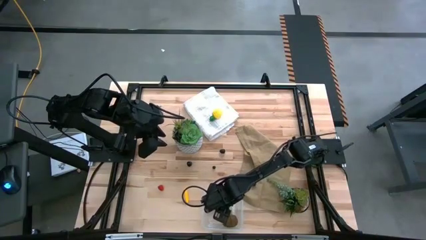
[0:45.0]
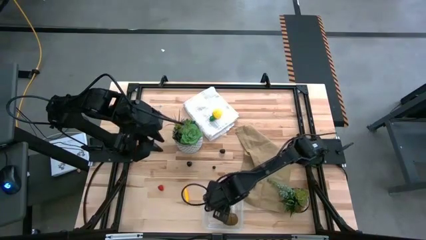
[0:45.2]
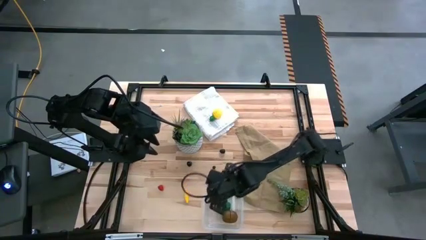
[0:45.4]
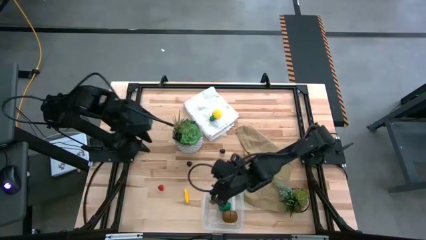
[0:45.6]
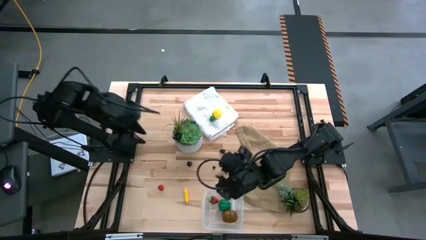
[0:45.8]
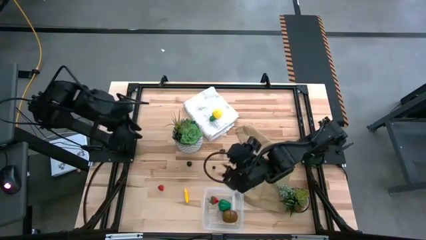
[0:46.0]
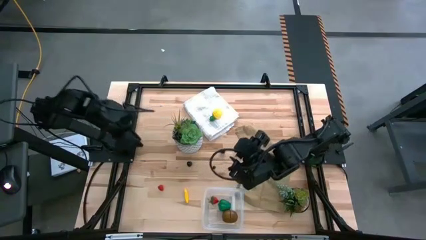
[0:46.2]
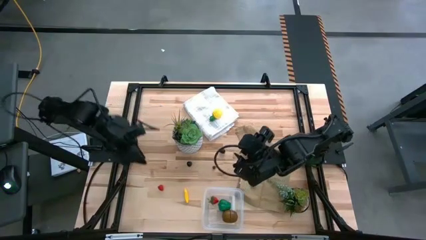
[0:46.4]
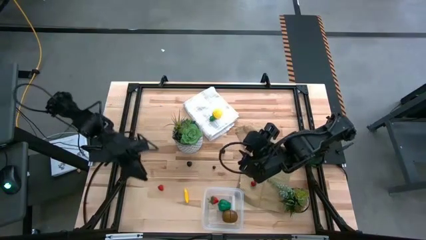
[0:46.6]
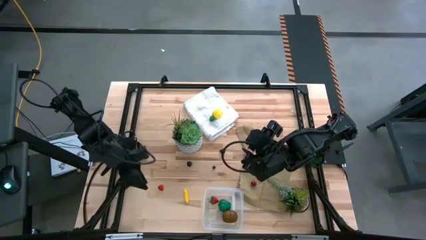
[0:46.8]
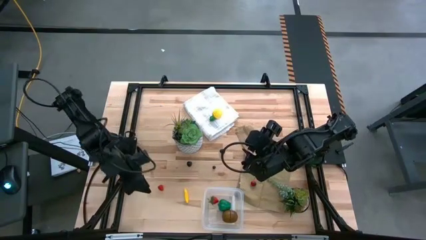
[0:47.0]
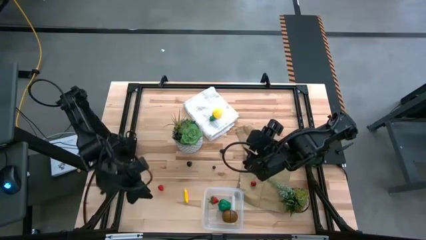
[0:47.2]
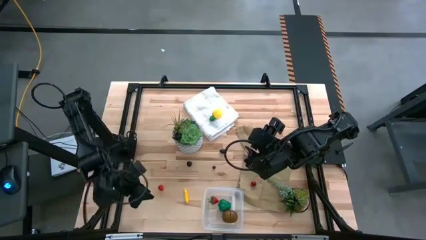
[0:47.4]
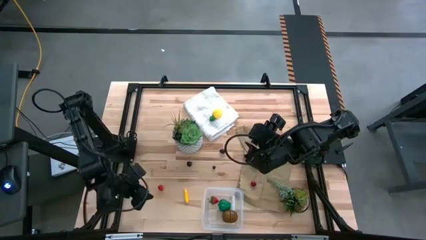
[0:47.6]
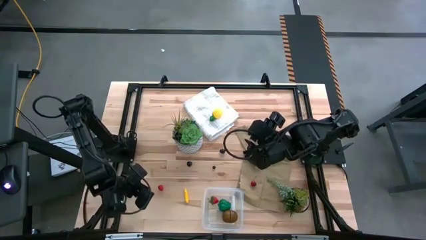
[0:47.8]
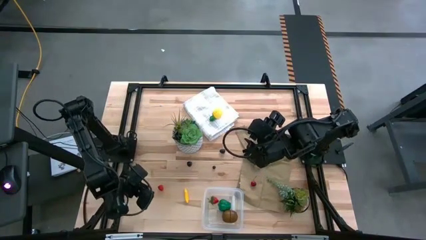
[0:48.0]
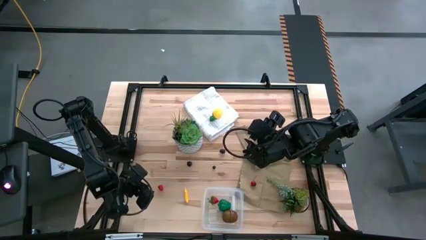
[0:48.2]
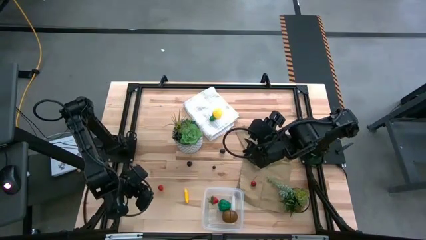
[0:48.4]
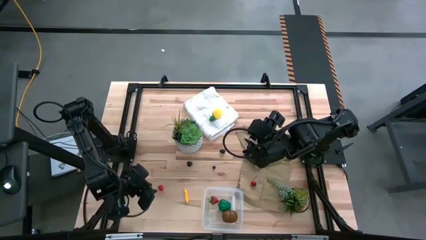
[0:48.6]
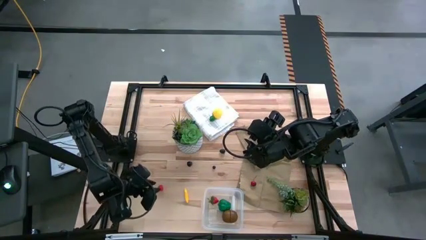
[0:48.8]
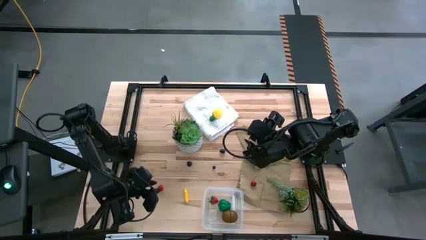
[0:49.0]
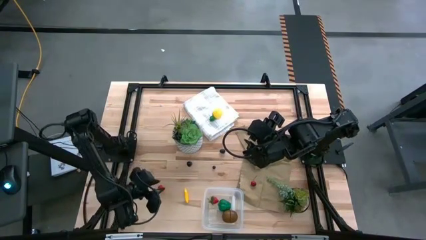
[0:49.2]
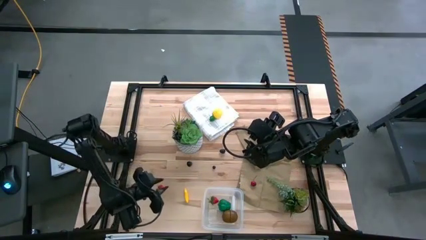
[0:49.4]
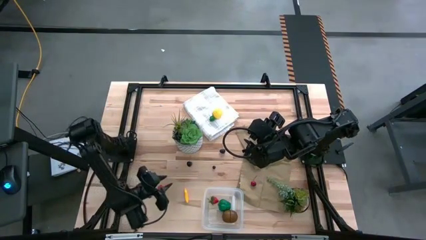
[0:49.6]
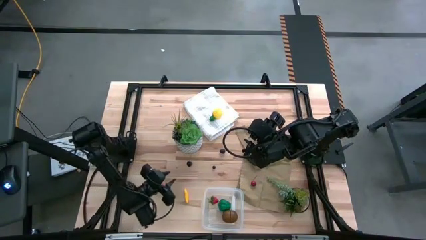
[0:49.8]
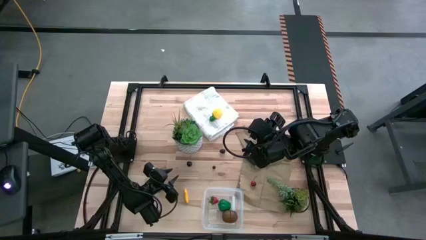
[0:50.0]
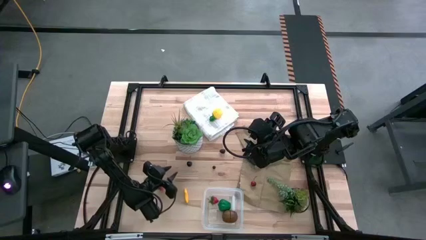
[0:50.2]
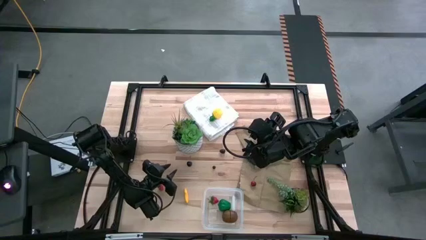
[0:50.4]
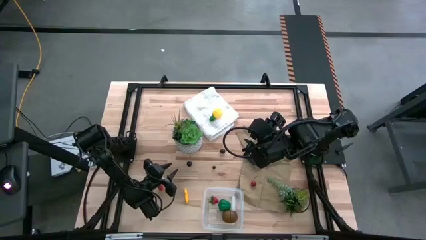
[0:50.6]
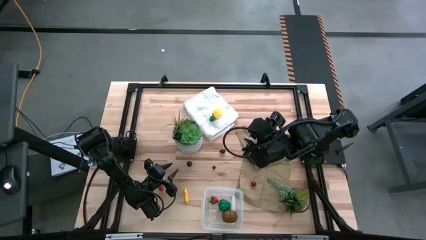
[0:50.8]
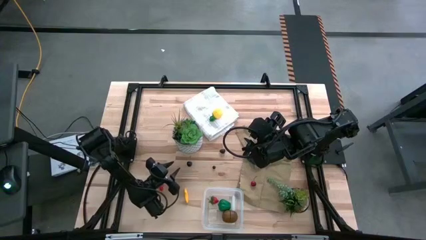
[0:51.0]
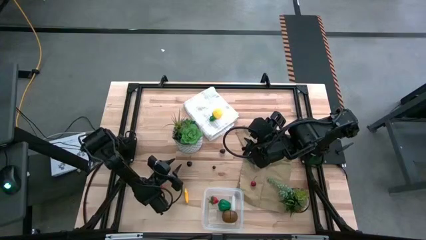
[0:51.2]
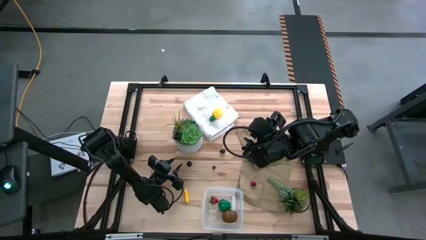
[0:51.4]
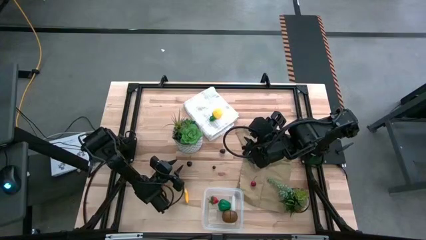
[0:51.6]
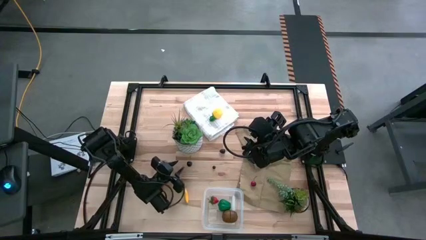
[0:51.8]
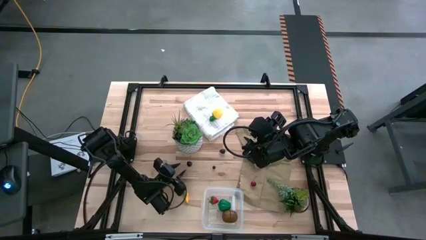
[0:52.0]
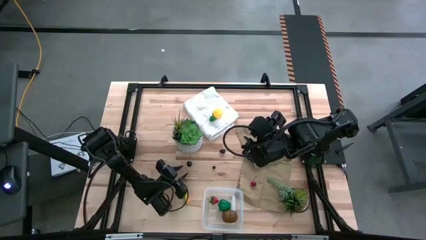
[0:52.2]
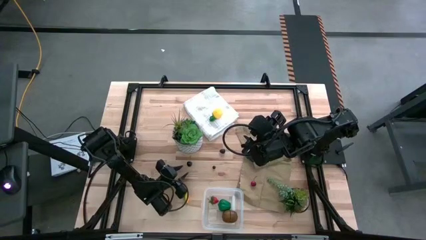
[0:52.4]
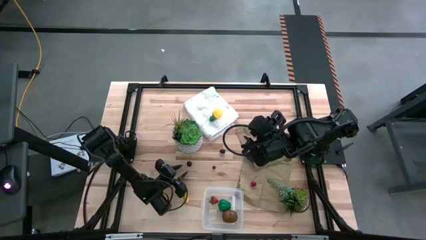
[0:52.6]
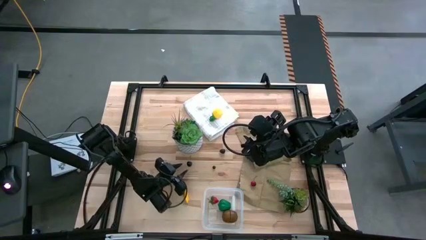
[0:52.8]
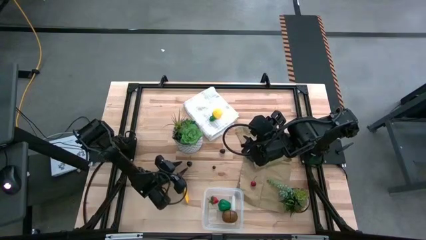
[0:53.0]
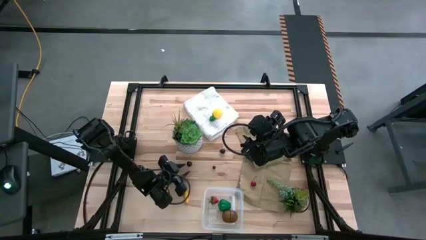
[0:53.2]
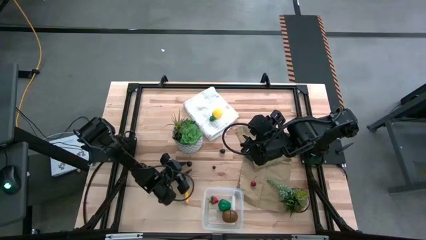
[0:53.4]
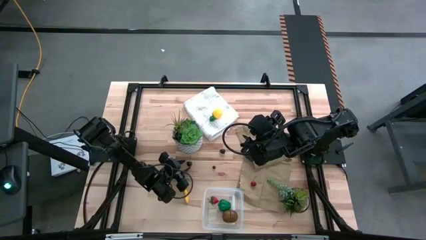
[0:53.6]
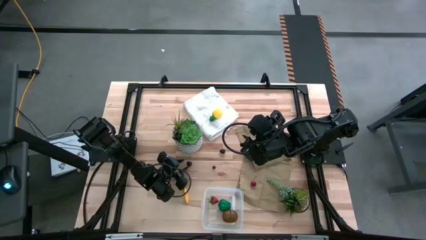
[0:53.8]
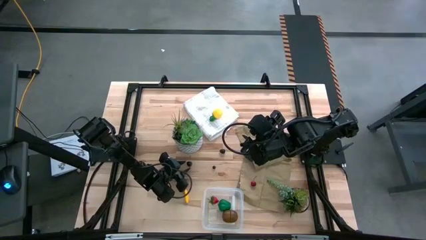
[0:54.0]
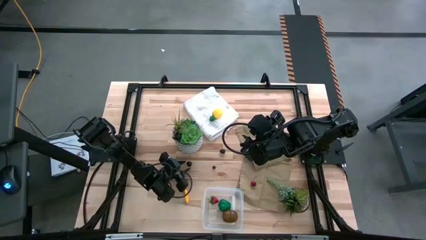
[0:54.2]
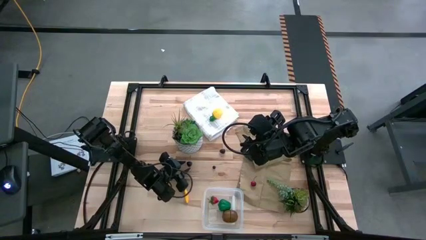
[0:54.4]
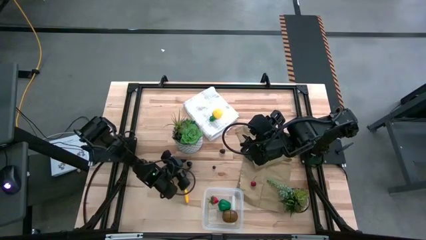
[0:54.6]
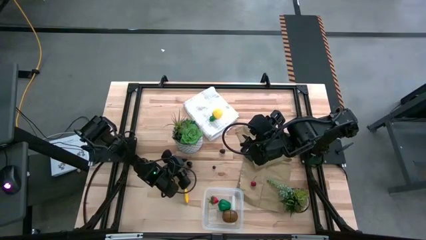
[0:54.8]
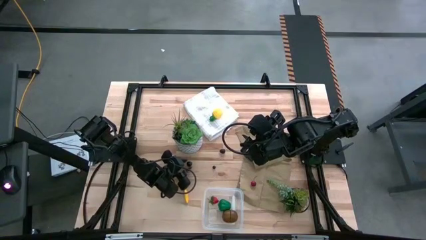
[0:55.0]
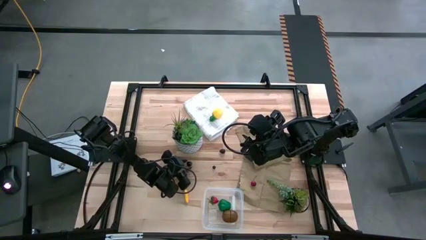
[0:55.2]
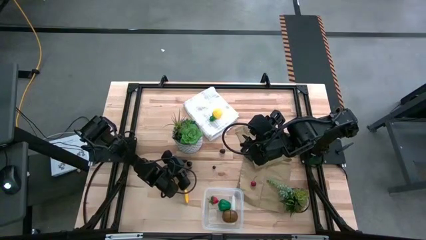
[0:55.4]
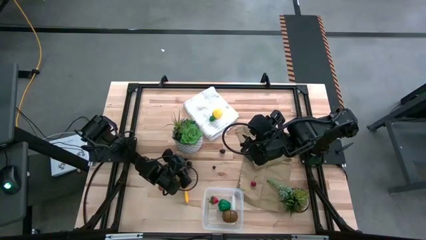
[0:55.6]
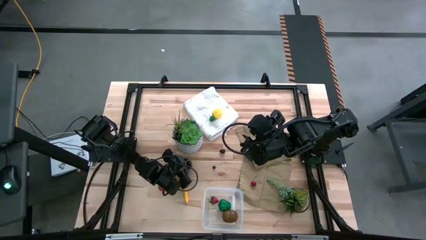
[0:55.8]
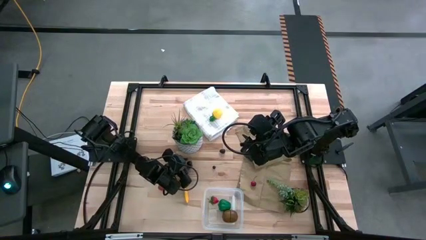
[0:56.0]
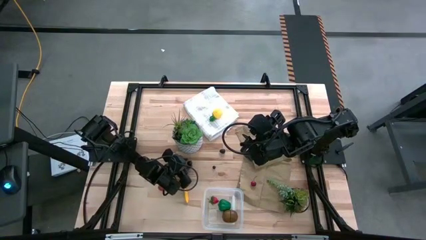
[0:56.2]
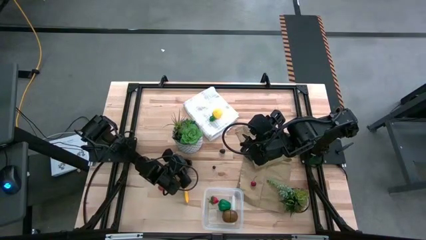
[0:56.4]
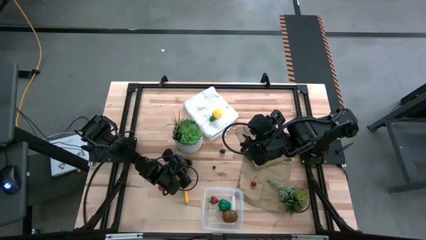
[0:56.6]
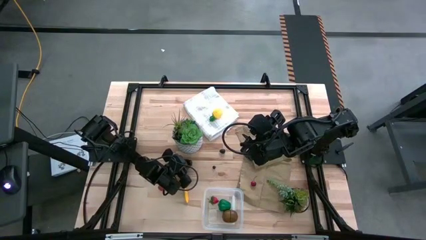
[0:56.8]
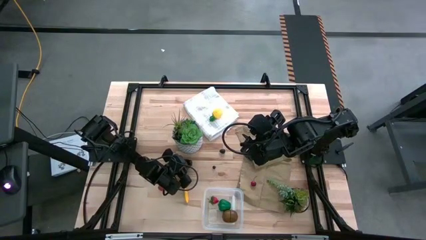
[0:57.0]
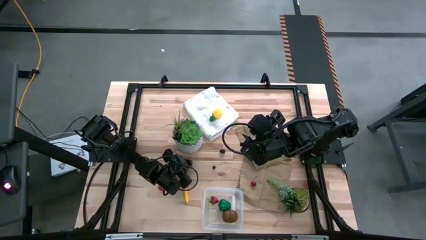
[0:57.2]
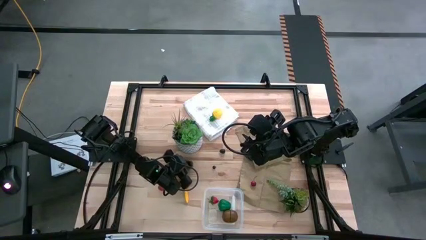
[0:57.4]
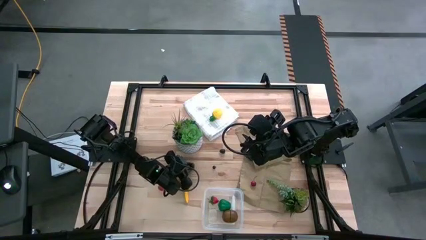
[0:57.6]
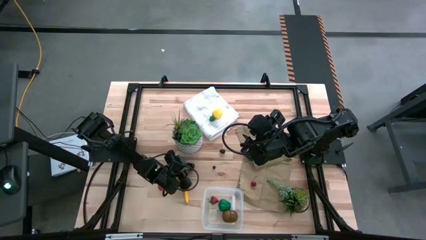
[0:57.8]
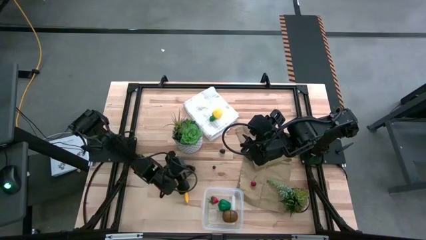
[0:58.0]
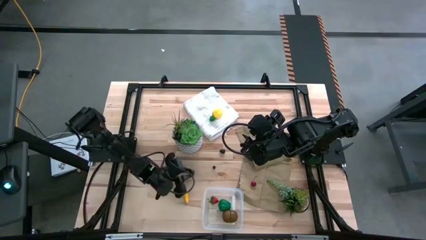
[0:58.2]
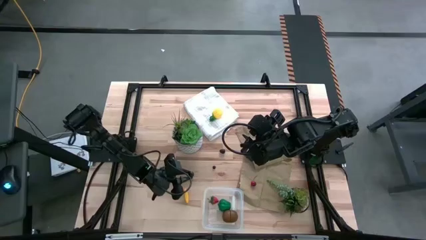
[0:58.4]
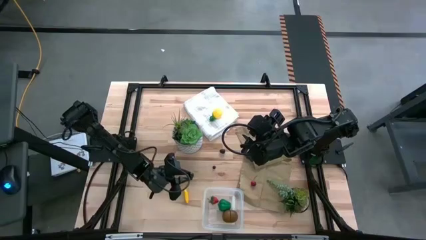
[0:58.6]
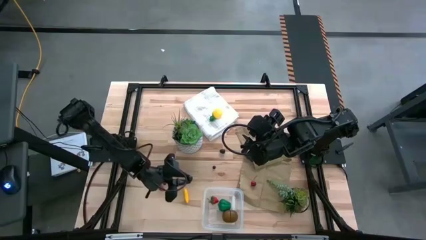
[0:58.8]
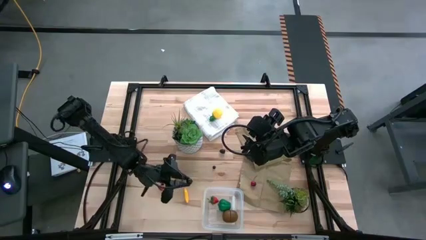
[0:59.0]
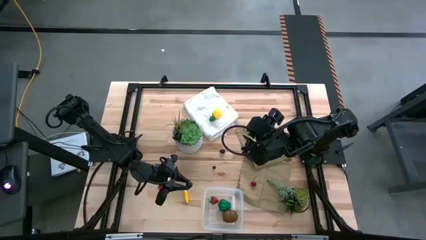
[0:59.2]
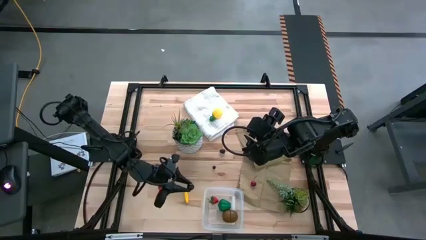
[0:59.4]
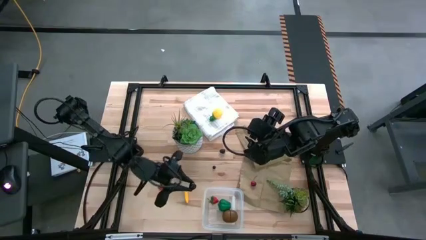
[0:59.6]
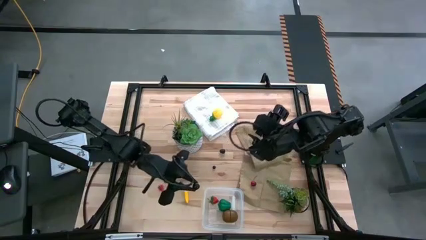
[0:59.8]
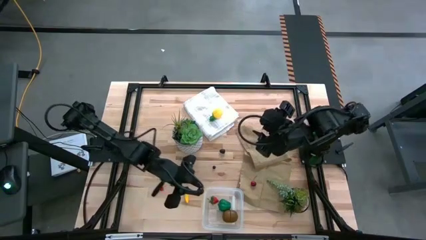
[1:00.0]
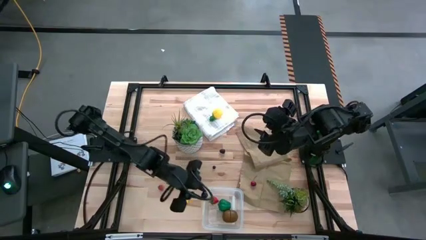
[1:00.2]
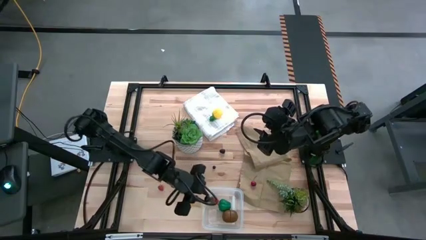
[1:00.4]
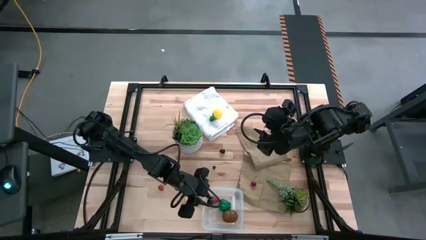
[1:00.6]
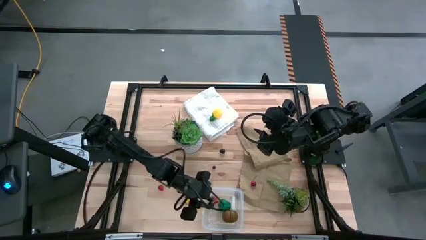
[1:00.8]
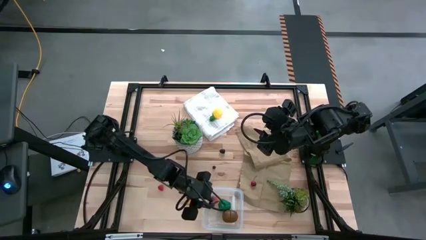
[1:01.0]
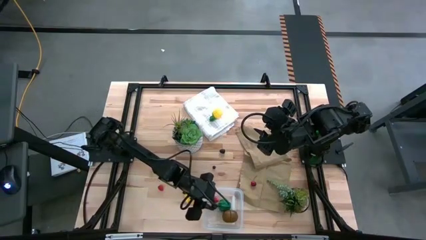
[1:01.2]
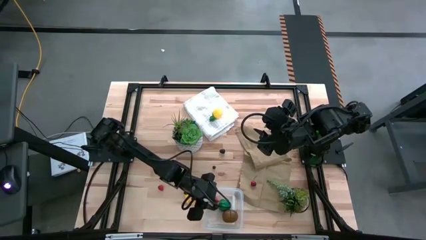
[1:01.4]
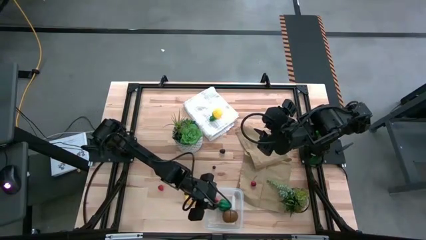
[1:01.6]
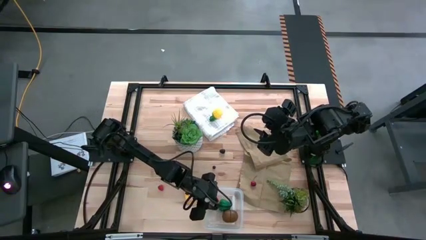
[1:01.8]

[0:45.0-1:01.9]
Task: Pick and placing Produce into tupperware
Put the dark purple cherry into the transparent bin
